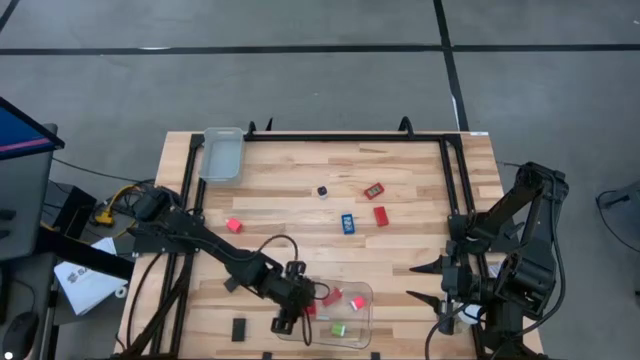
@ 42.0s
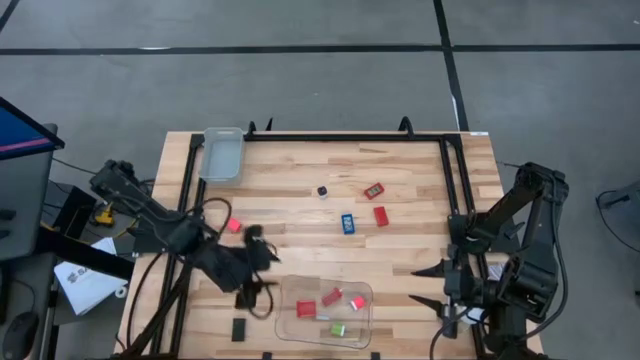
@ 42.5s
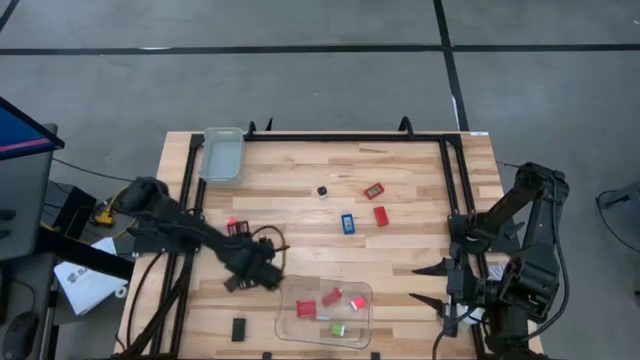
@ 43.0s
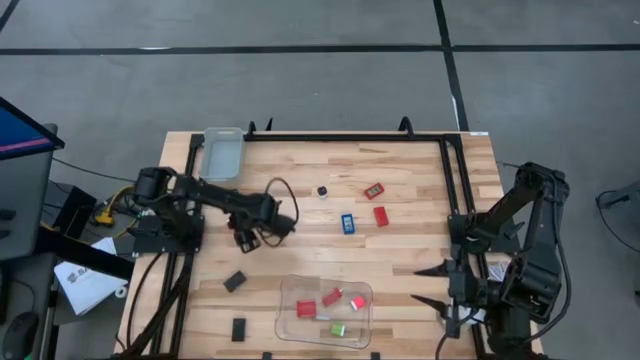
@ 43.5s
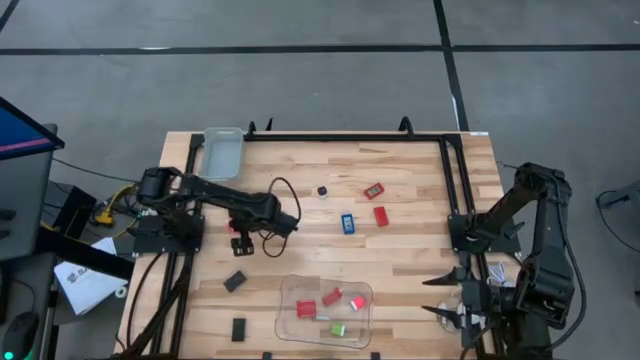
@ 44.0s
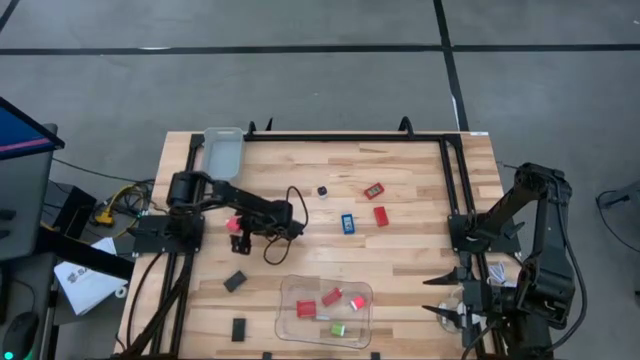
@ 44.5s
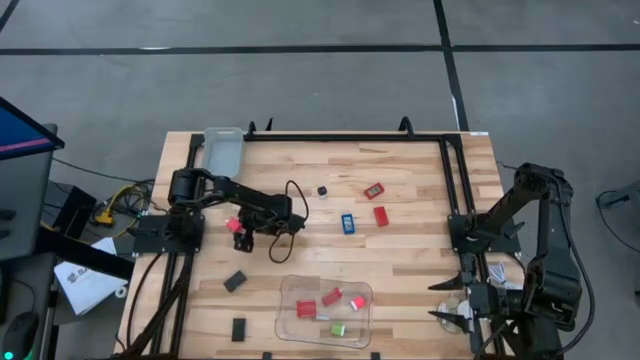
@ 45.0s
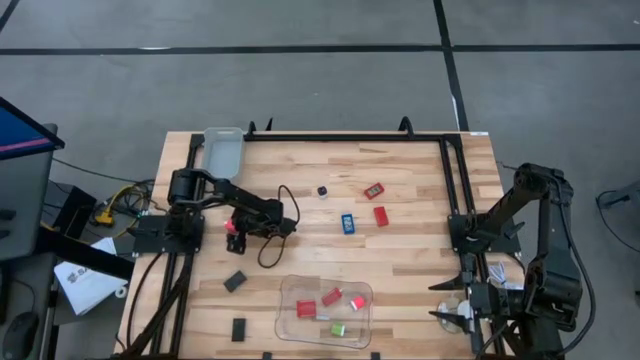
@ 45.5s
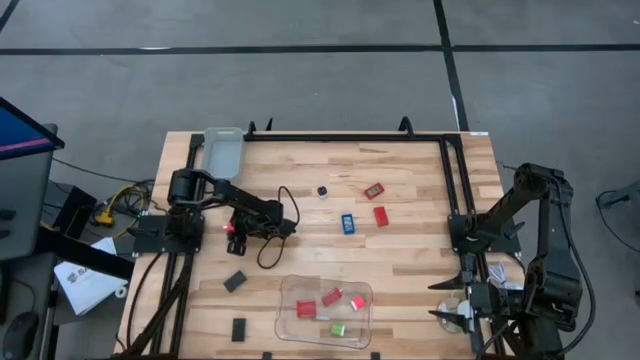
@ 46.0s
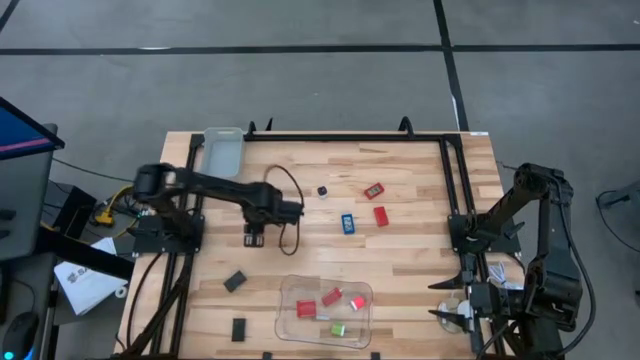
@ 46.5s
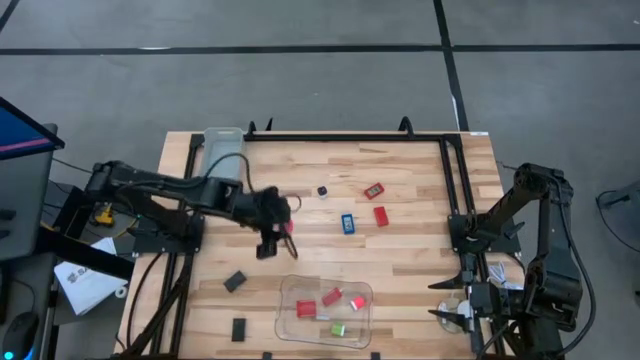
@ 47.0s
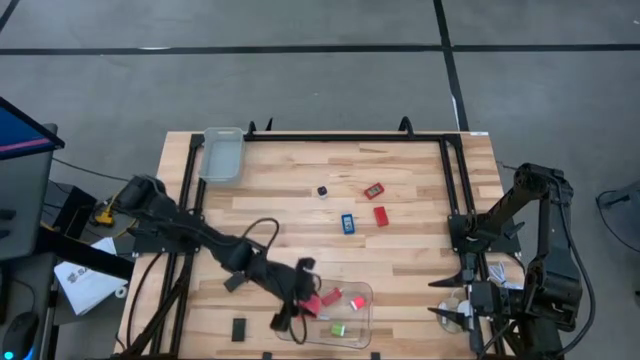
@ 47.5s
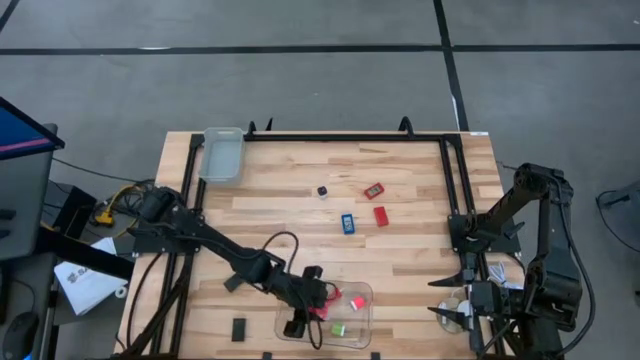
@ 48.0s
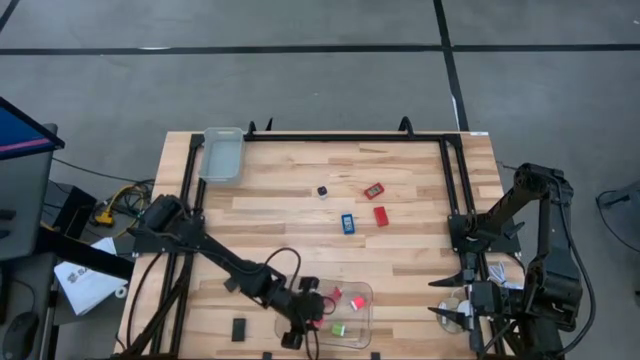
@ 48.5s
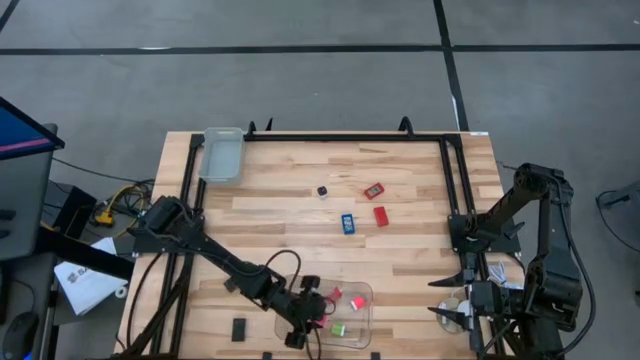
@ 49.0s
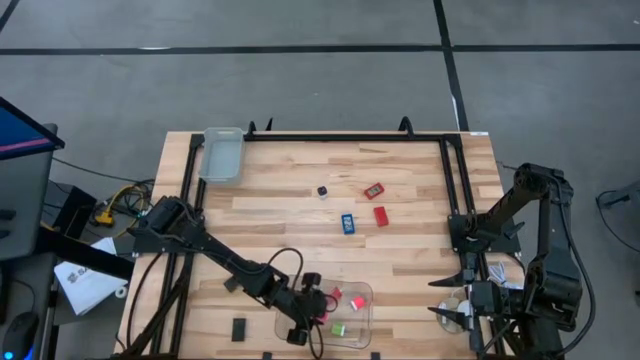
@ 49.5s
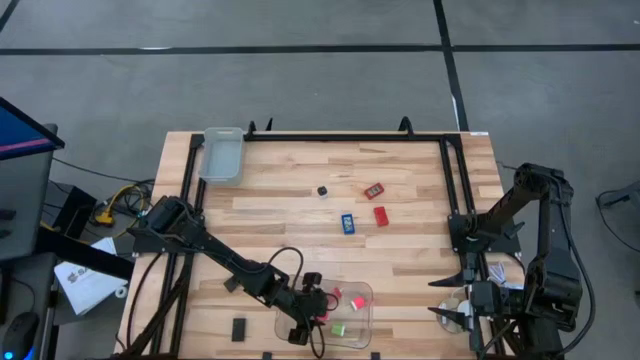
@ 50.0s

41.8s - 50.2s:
Task: Pick & Place Office items
Put the pink charger adapter into the transparent bin

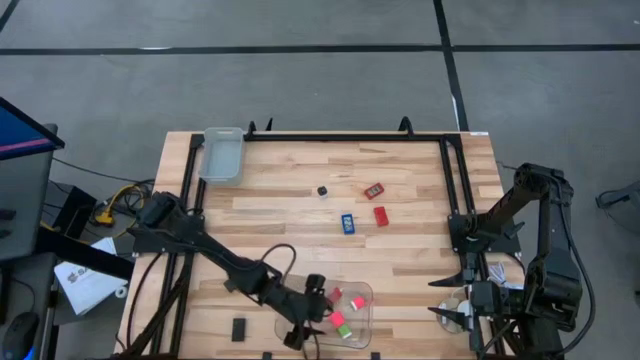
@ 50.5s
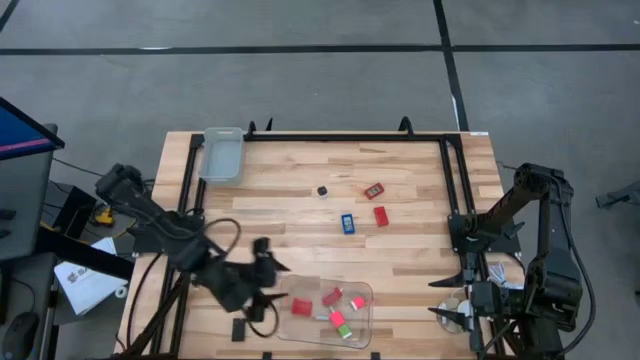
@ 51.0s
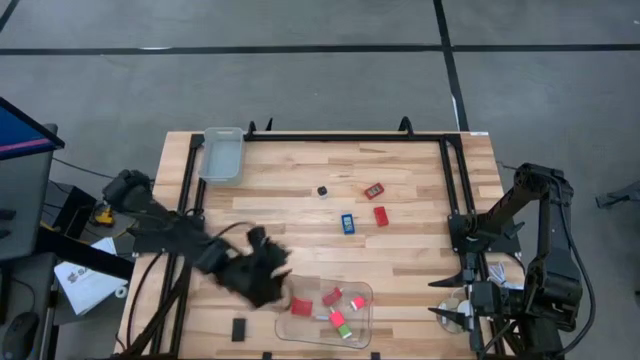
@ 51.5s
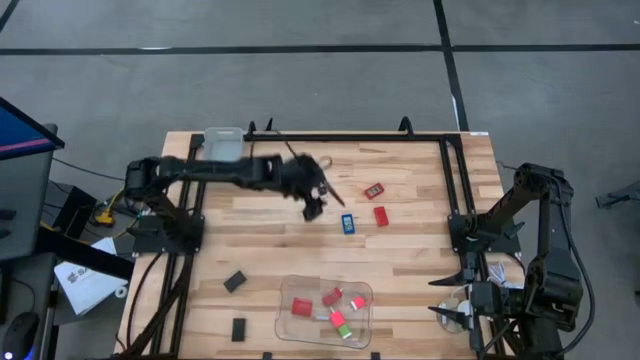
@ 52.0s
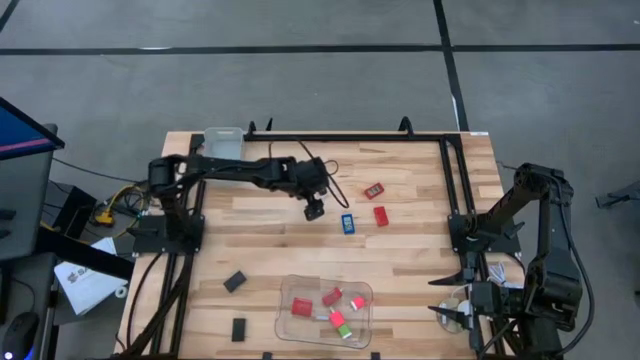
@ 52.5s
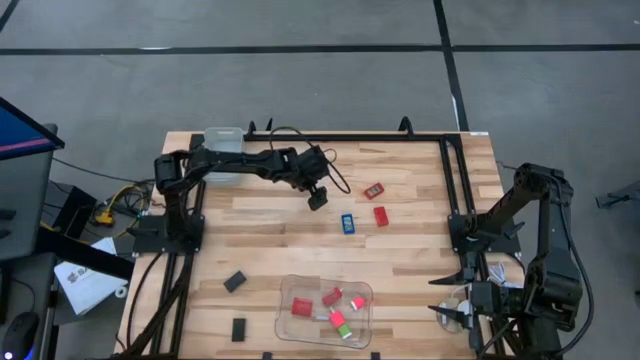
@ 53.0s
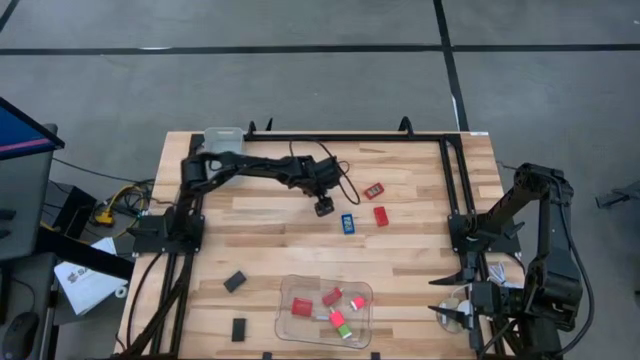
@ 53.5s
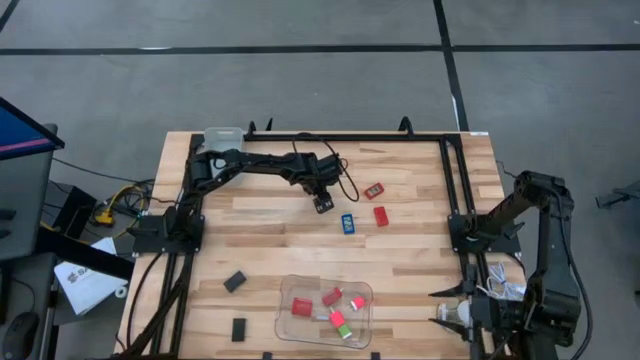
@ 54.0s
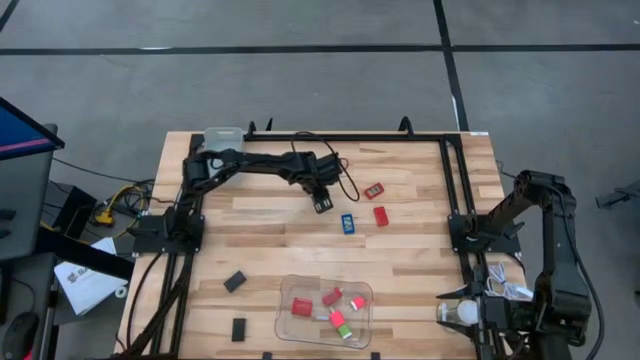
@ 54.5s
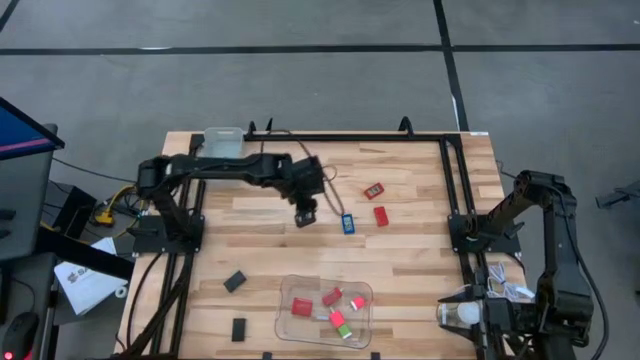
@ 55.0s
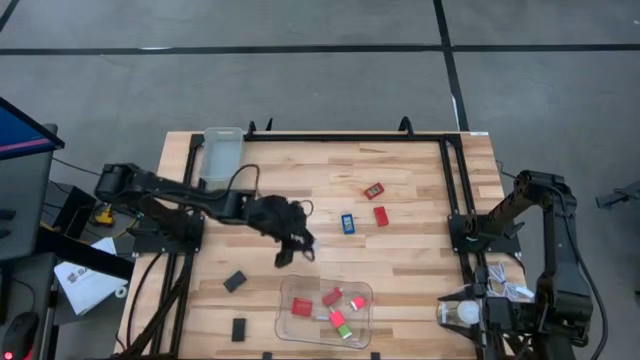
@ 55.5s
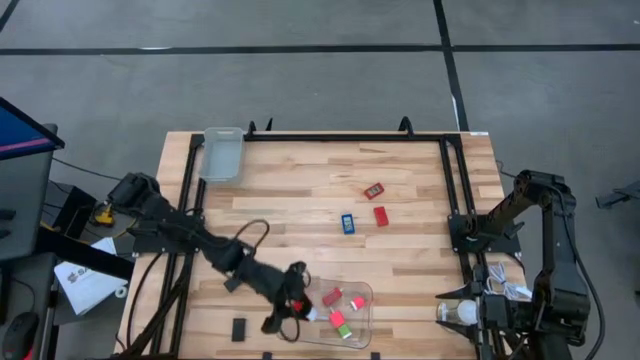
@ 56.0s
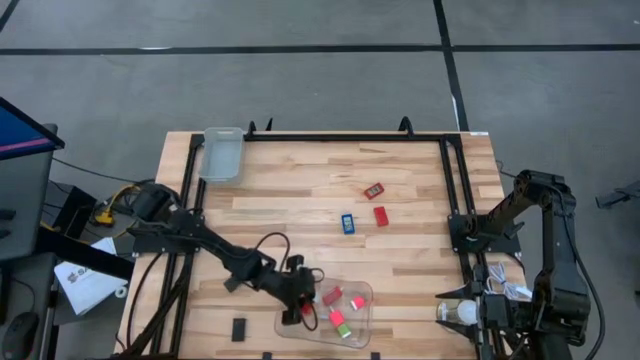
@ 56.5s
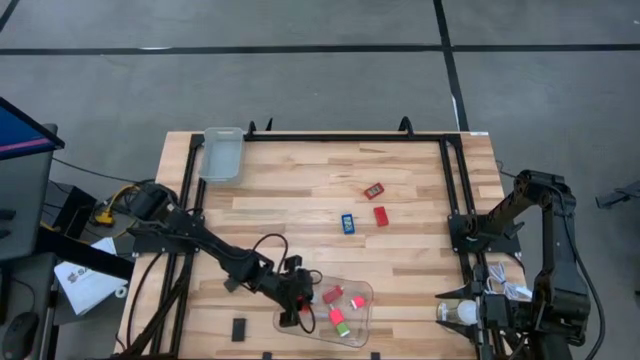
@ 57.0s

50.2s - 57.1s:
Put the white charger adapter into the transparent bin

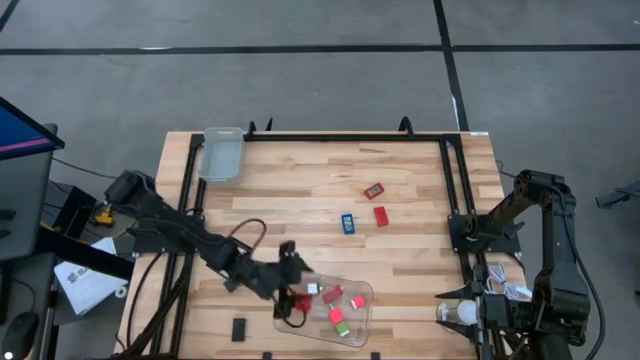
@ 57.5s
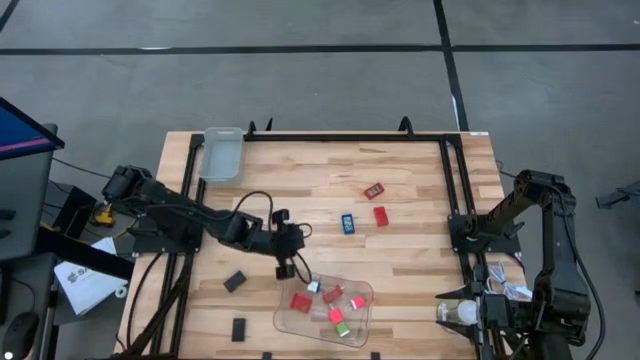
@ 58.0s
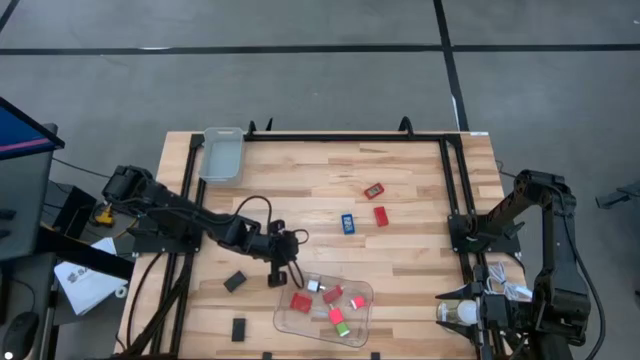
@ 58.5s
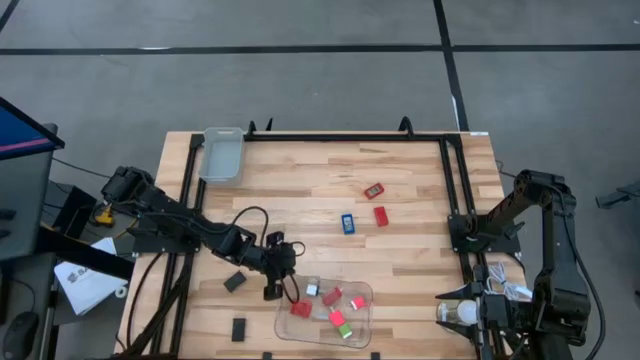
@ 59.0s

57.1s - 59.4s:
Adjust the transparent bin

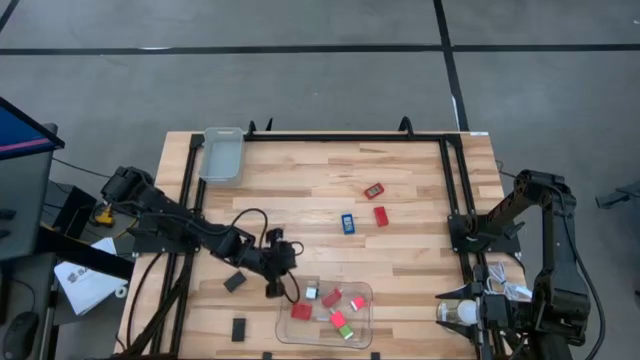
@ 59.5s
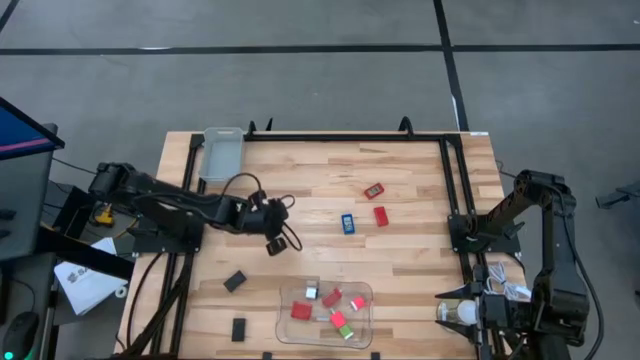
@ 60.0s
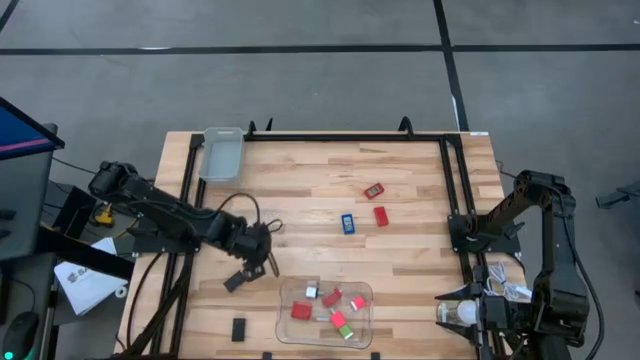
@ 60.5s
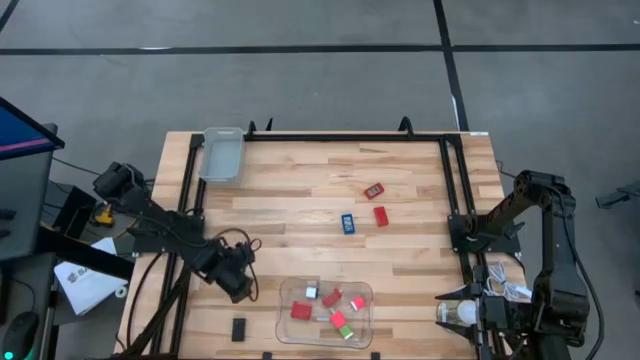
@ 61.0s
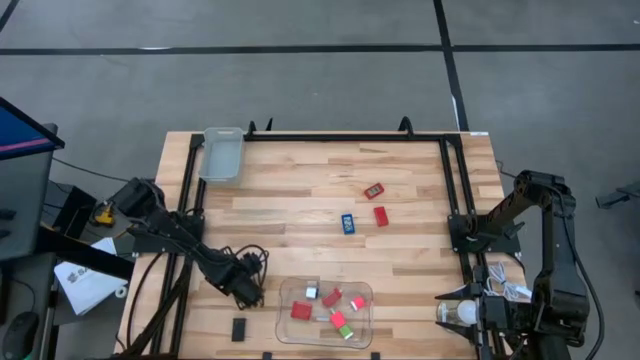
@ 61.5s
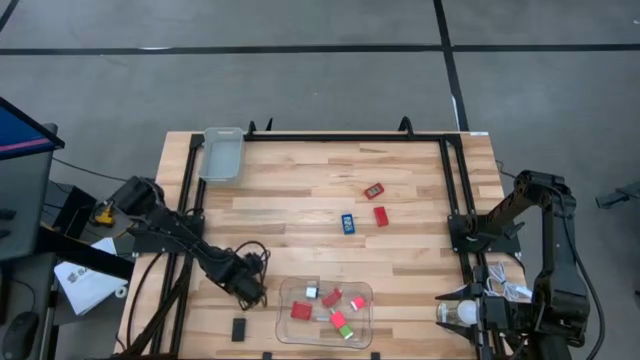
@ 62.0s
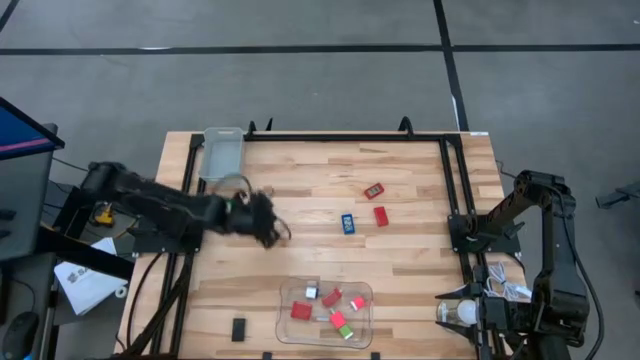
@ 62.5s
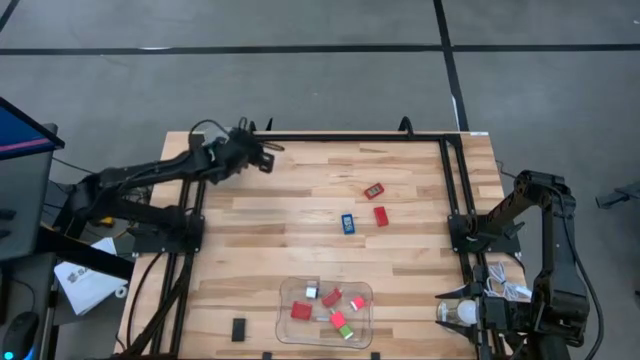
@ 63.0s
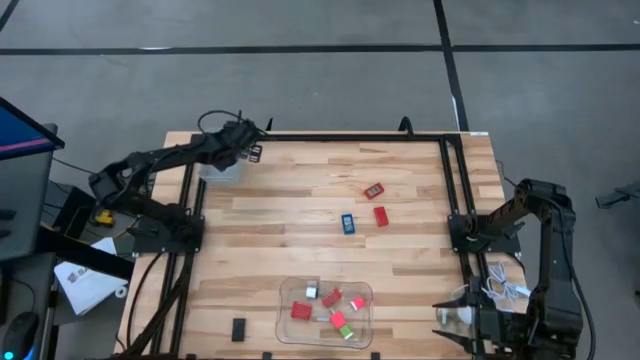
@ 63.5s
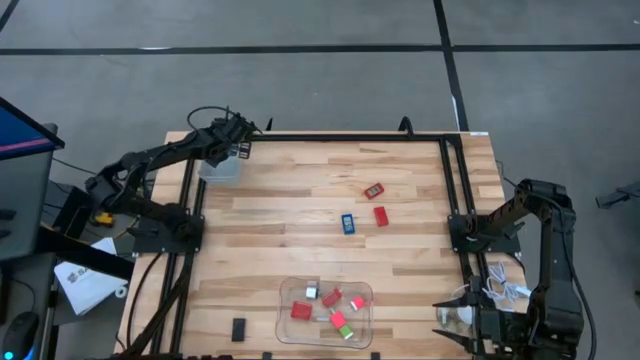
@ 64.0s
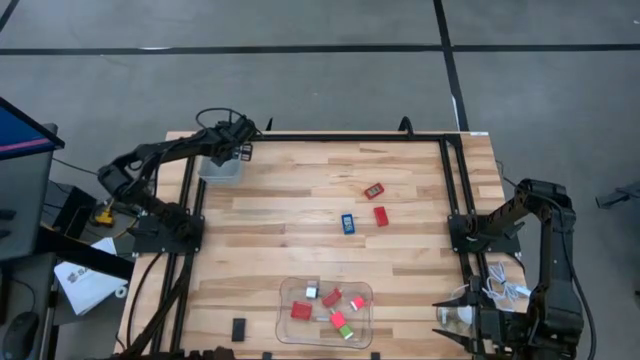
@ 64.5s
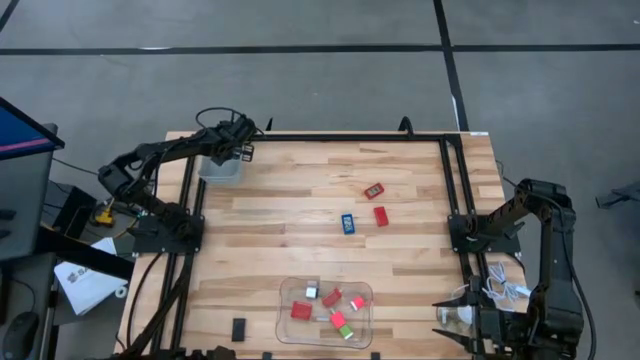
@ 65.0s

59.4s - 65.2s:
Put the top black digital clock into the gray bin
